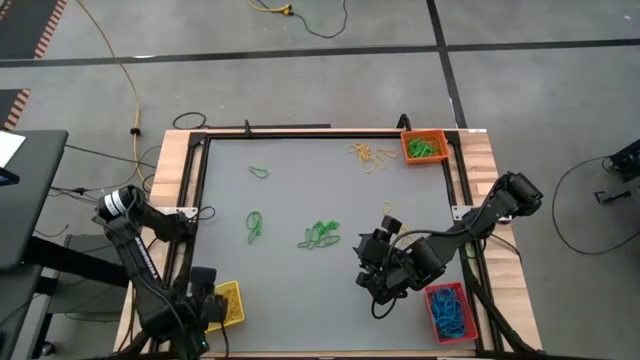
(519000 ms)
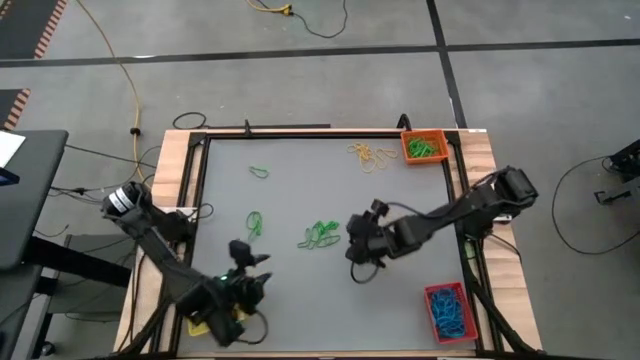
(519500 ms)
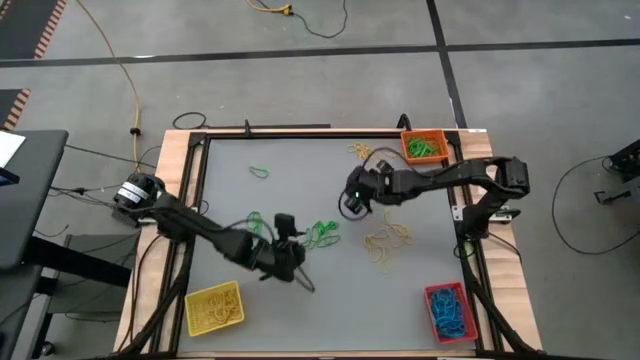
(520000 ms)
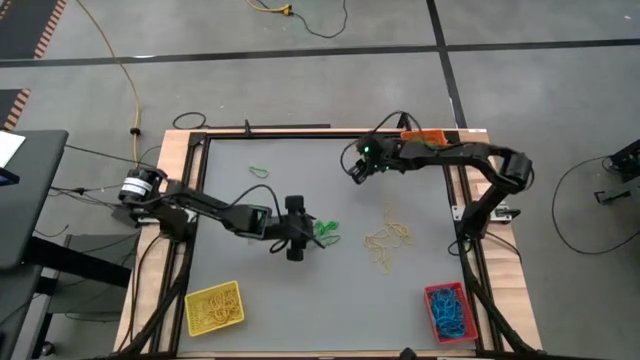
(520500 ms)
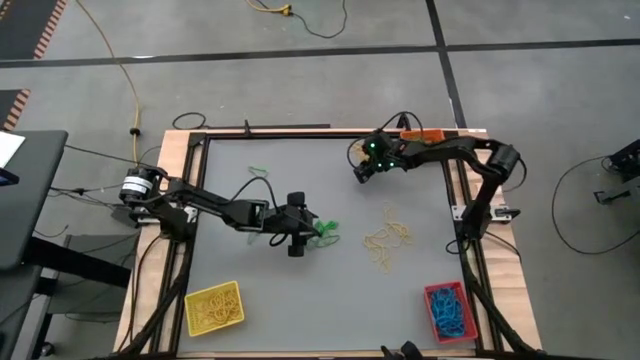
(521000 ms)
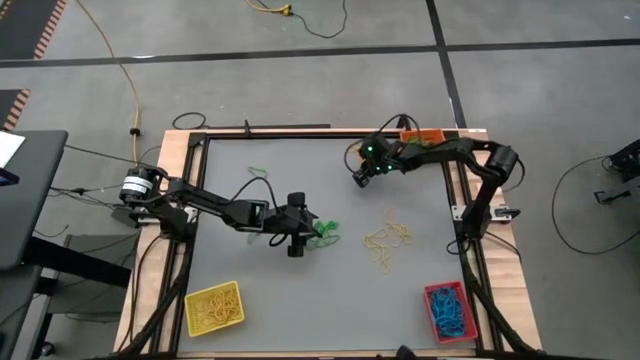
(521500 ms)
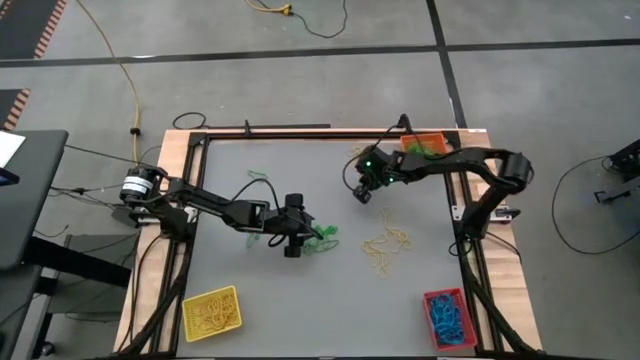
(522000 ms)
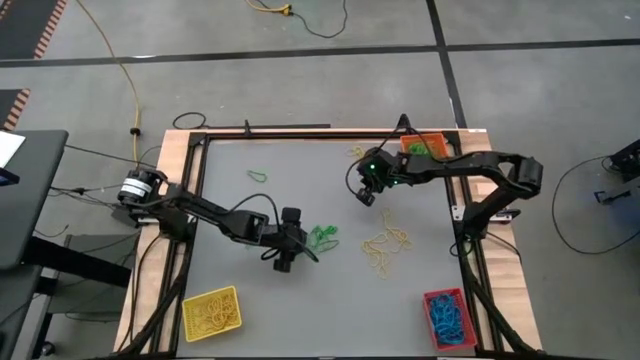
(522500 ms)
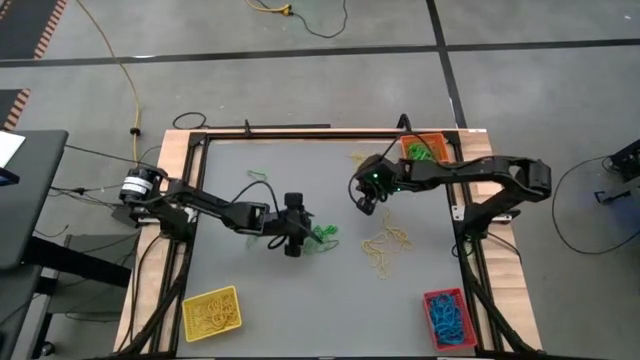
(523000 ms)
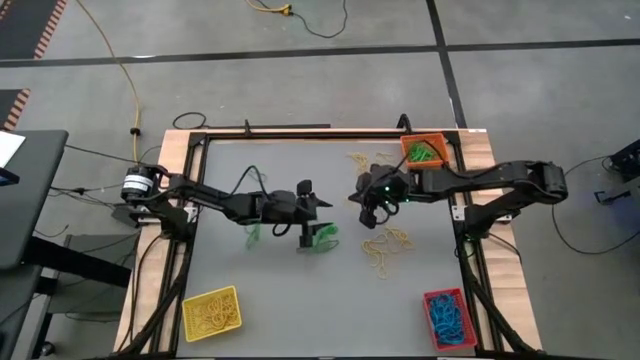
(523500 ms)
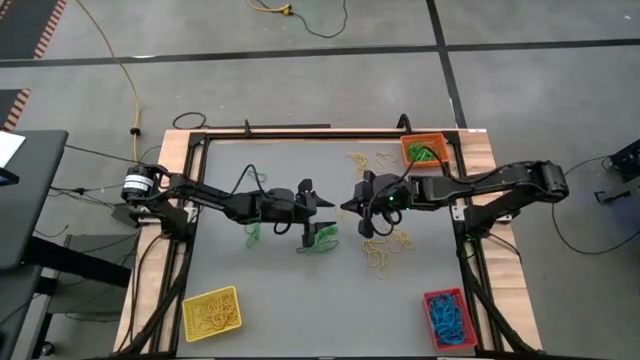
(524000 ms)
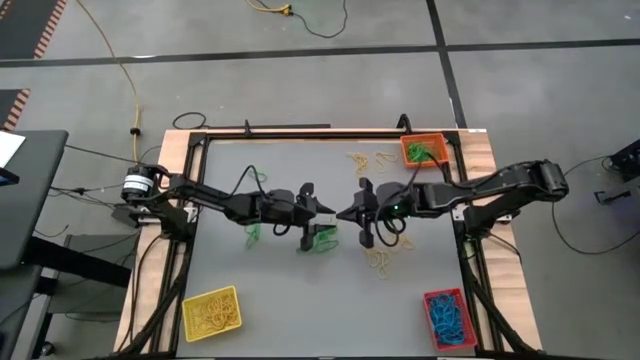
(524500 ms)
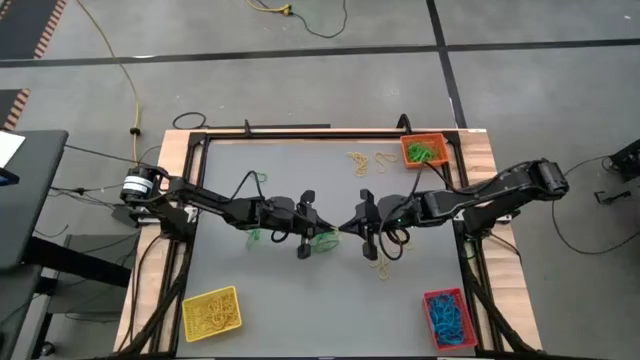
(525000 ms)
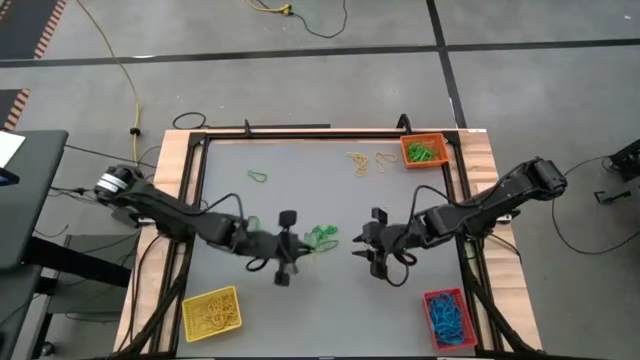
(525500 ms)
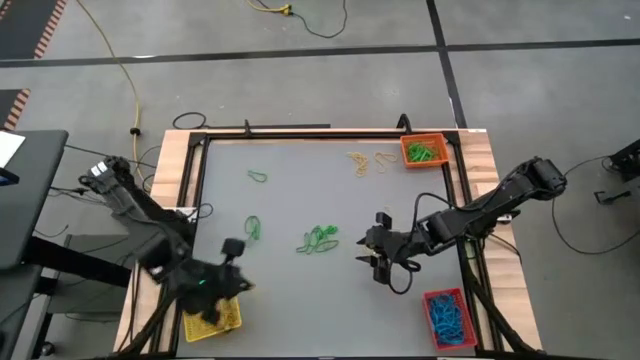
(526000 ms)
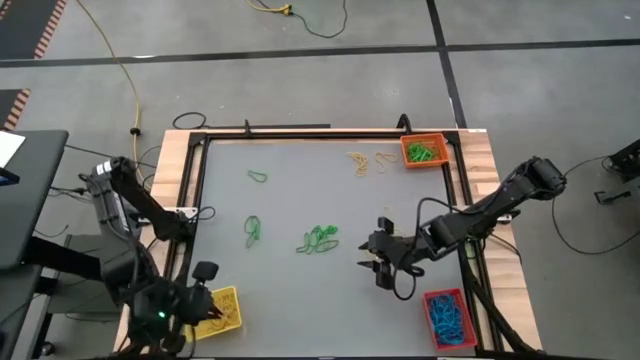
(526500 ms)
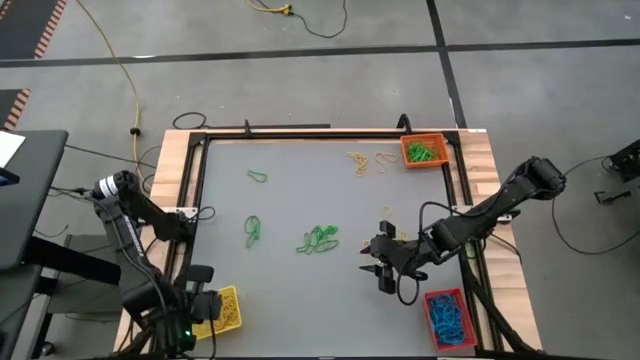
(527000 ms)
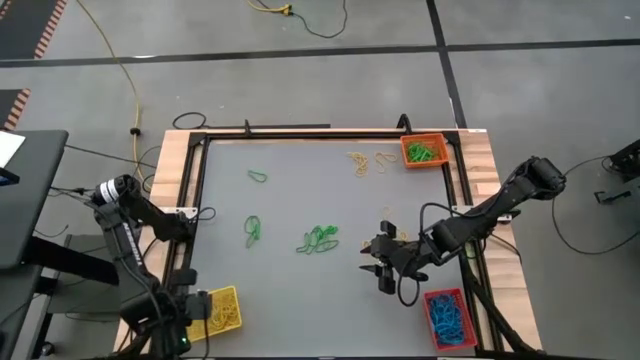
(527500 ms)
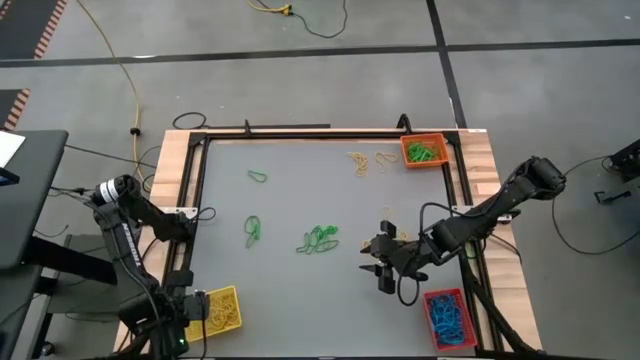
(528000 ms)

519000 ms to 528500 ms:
Task: Sort rubber bands into baskets
Put the yellow rubber band into the yellow bin

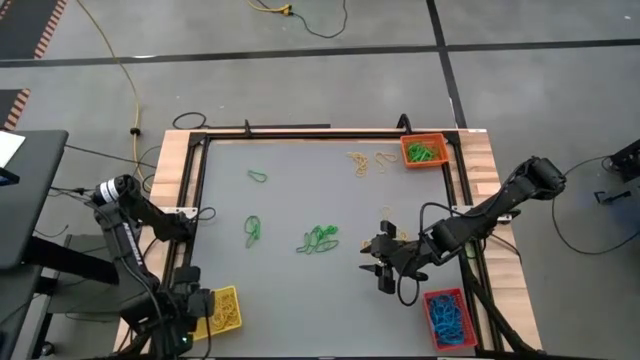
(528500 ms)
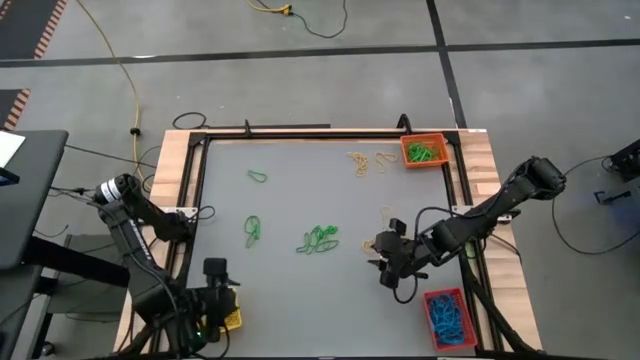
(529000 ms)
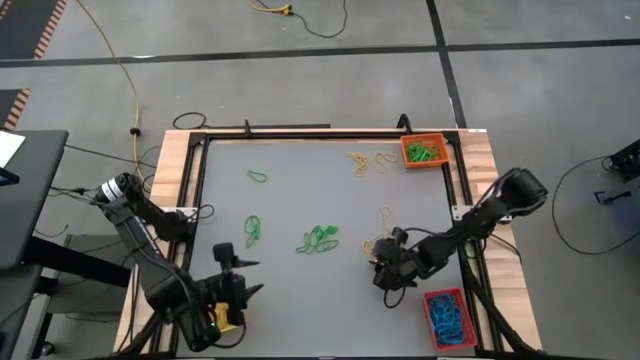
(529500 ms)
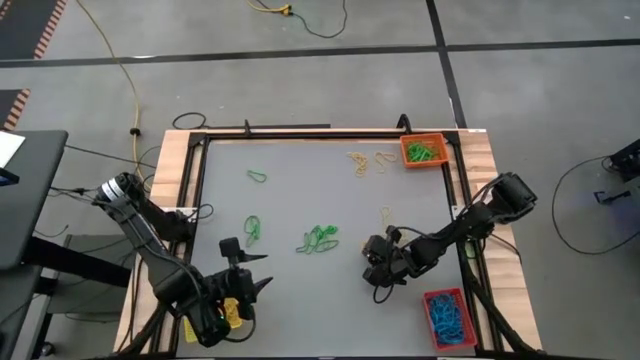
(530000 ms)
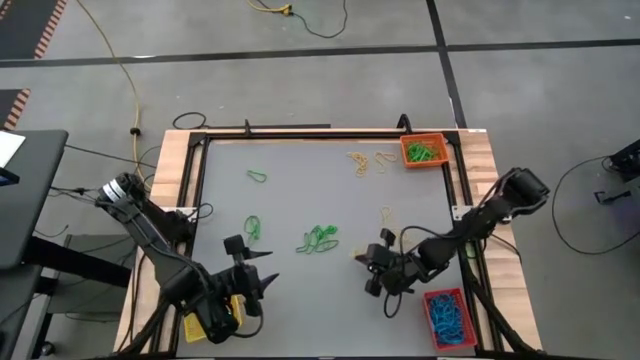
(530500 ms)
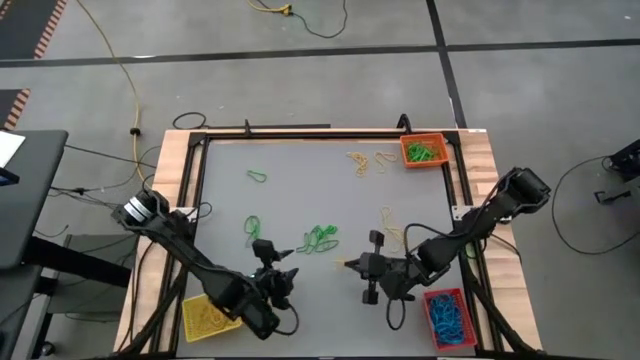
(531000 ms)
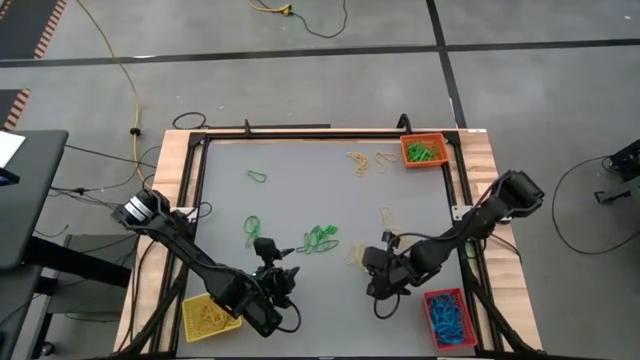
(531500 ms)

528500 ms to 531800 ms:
Put the yellow rubber band into the yellow bin

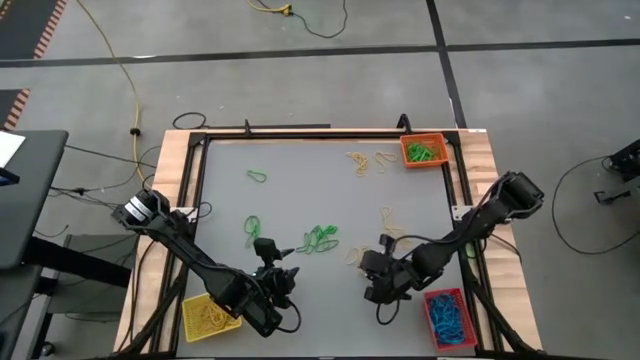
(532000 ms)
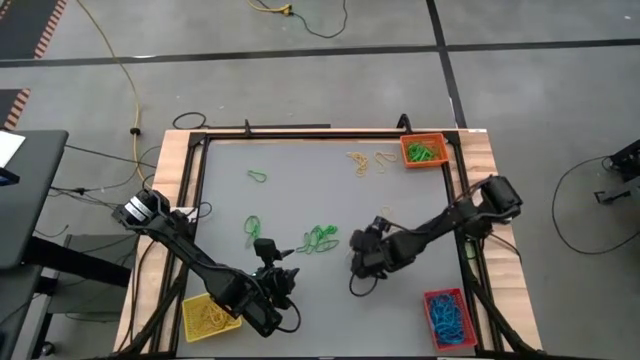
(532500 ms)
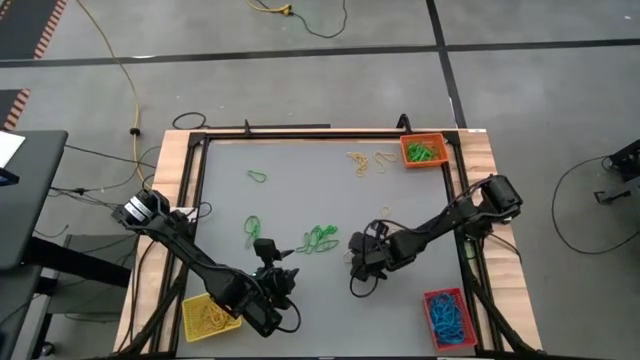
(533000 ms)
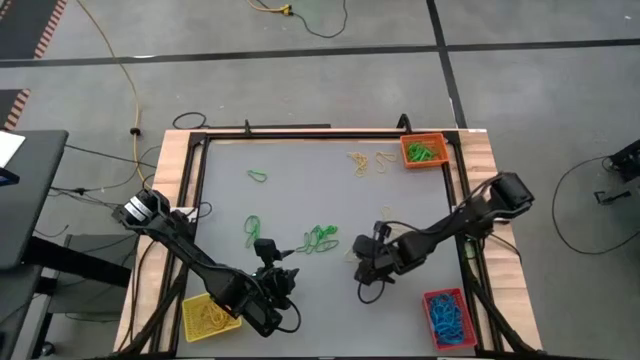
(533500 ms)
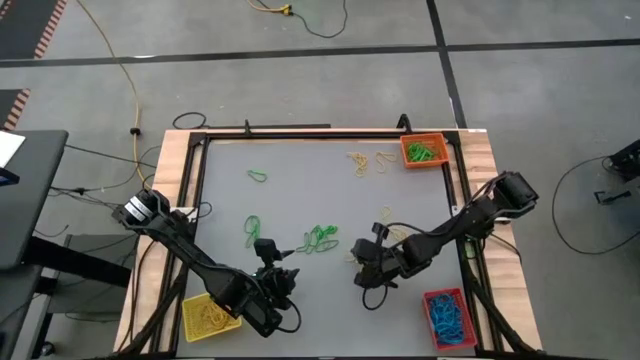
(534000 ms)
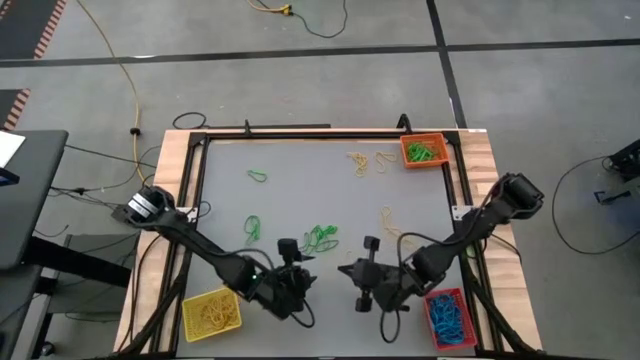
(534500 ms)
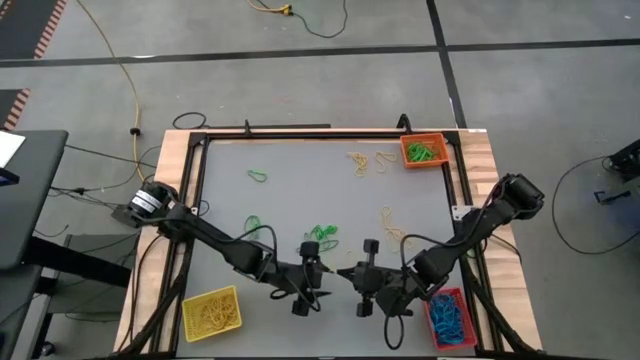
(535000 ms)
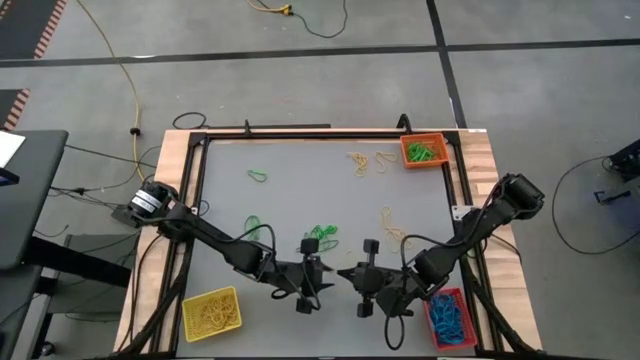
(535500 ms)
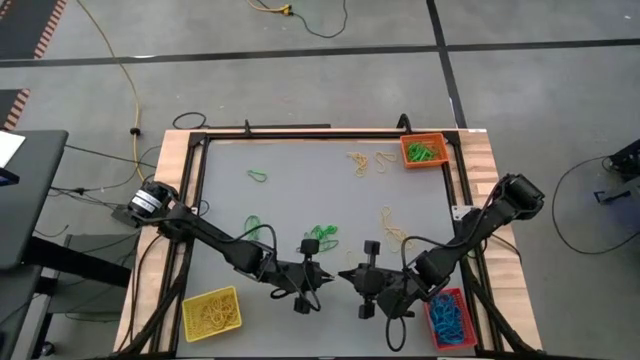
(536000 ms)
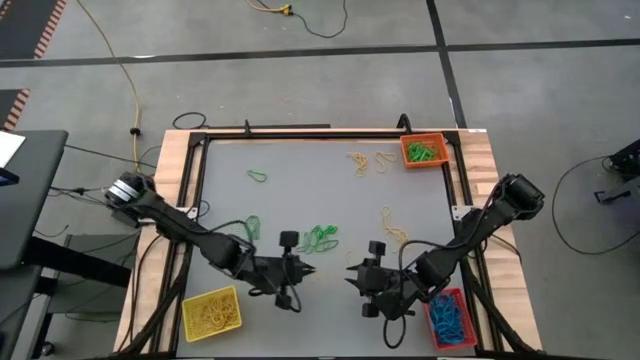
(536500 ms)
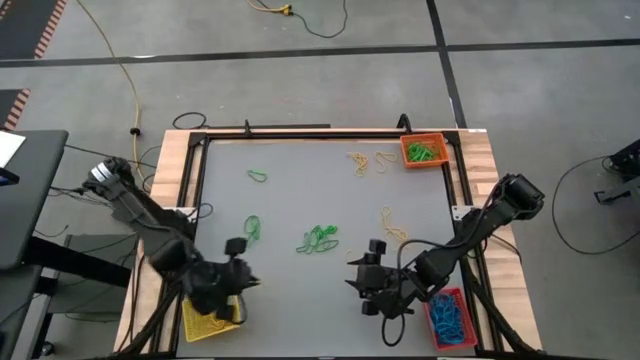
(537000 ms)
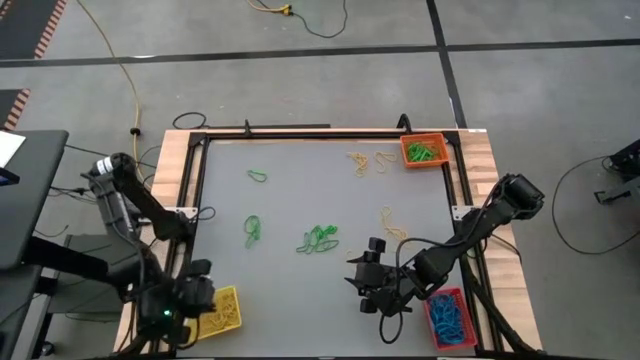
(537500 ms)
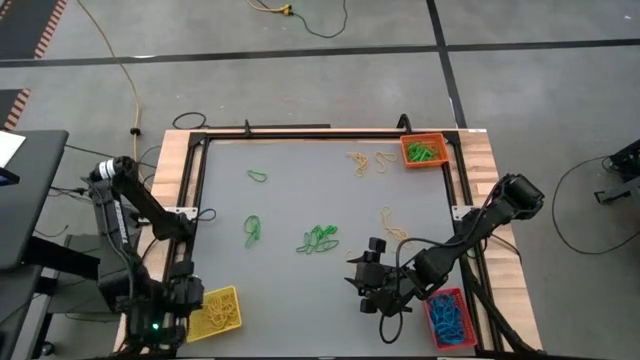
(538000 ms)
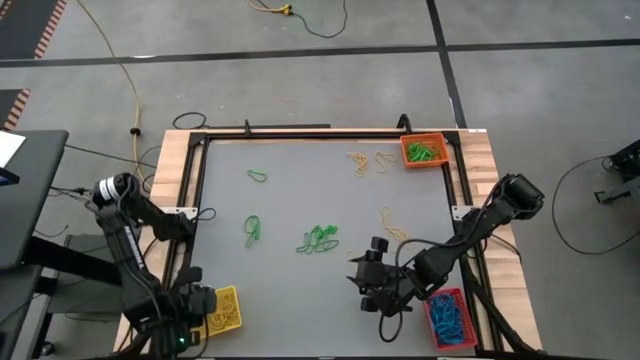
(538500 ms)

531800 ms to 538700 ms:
Put the yellow rubber band into the yellow bin
